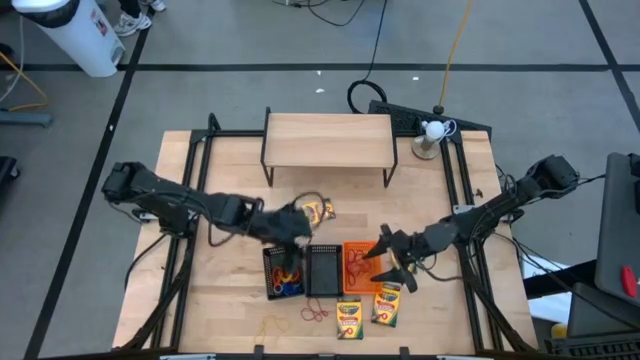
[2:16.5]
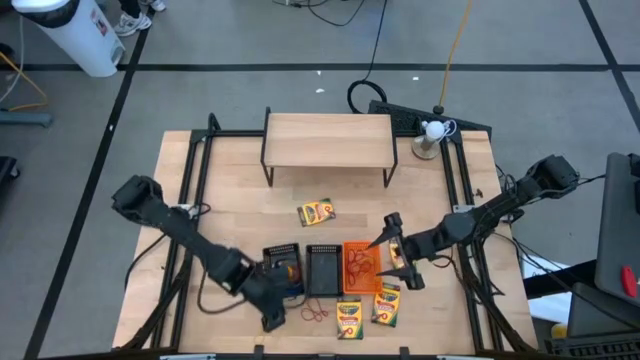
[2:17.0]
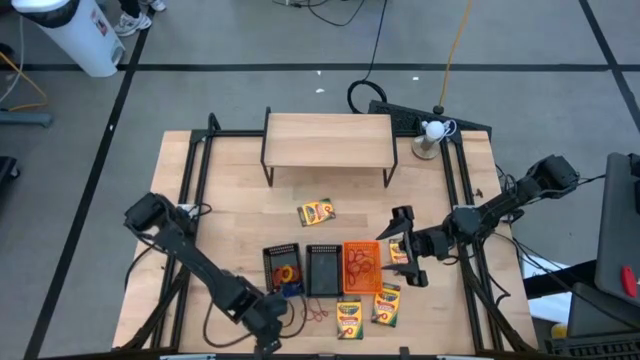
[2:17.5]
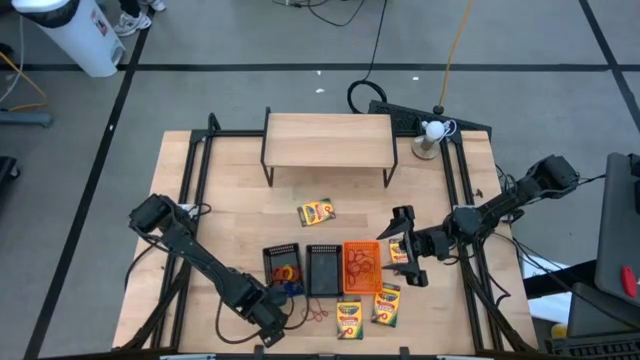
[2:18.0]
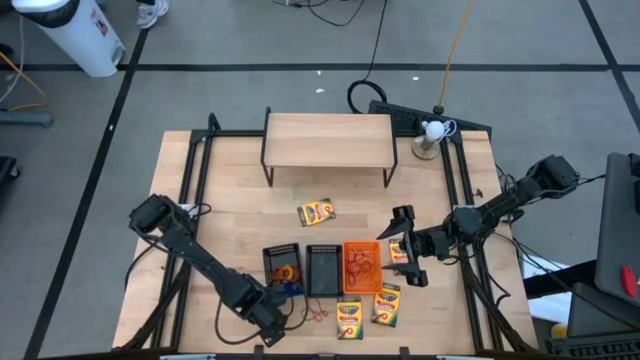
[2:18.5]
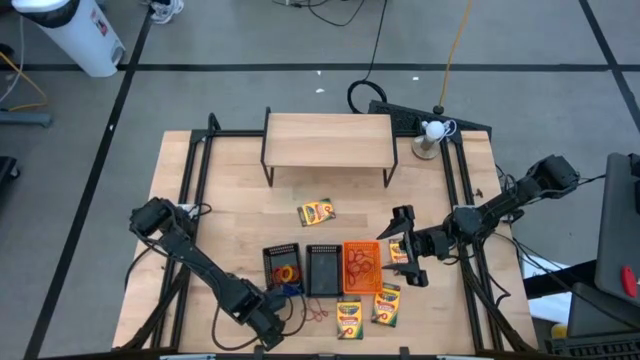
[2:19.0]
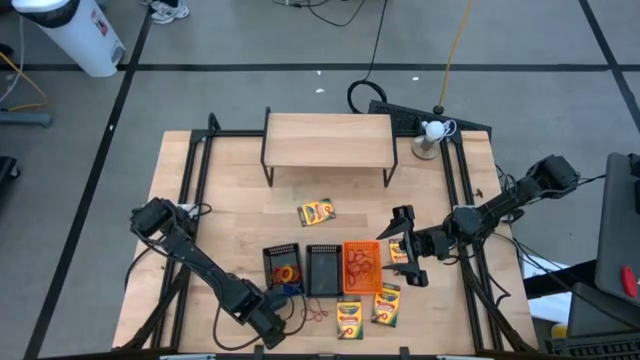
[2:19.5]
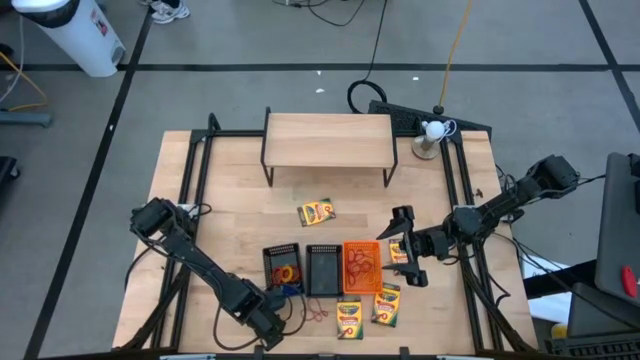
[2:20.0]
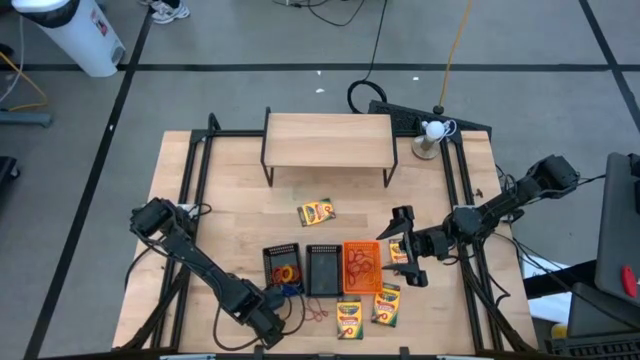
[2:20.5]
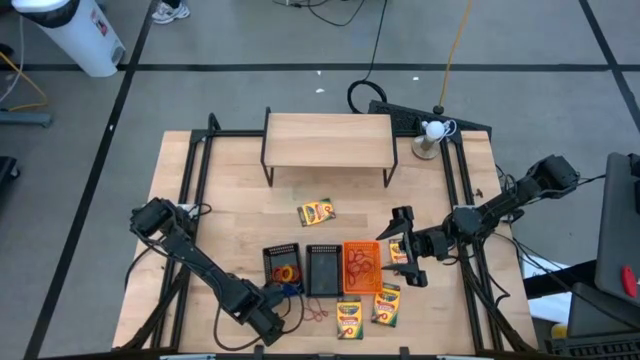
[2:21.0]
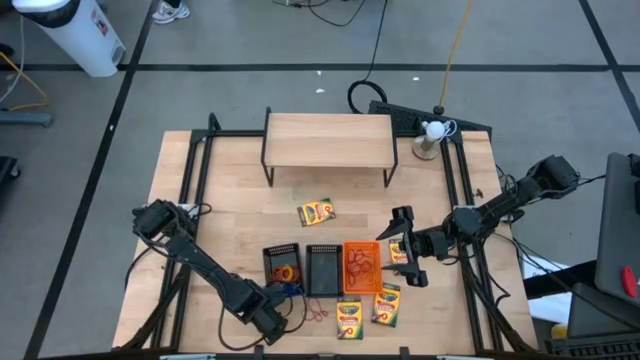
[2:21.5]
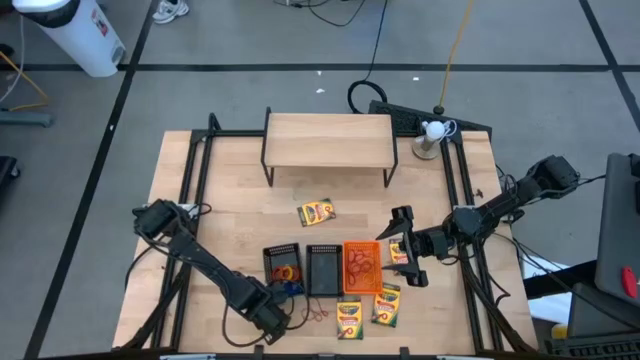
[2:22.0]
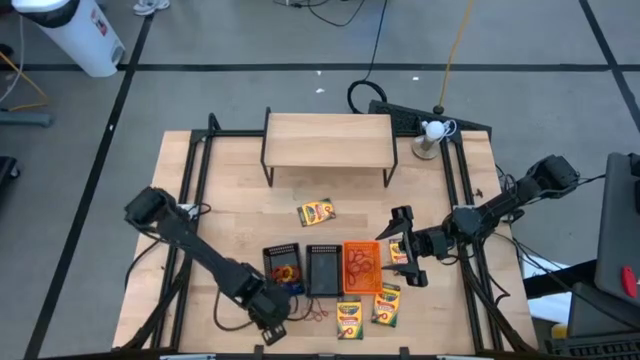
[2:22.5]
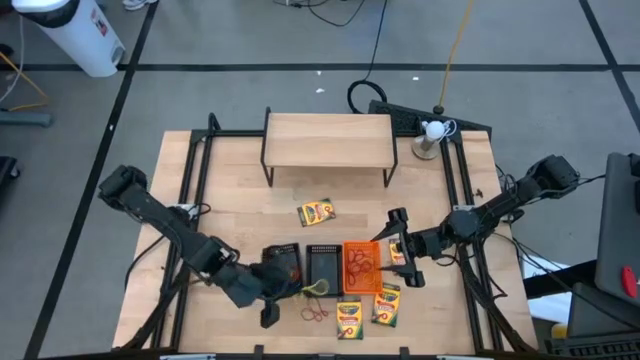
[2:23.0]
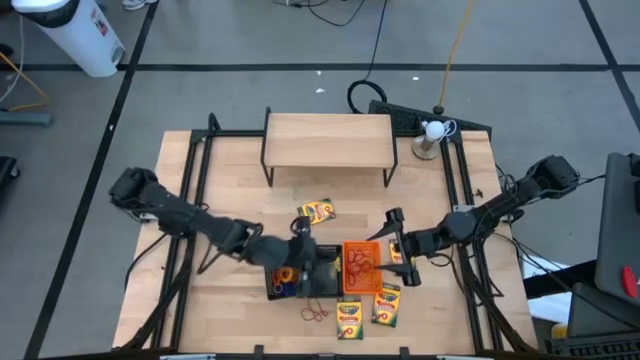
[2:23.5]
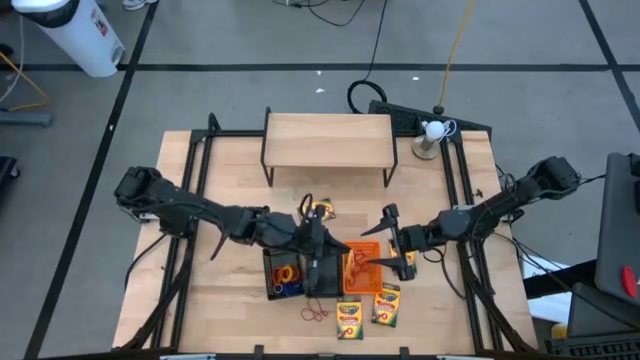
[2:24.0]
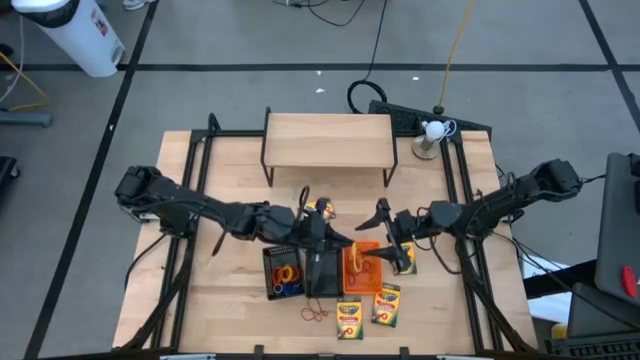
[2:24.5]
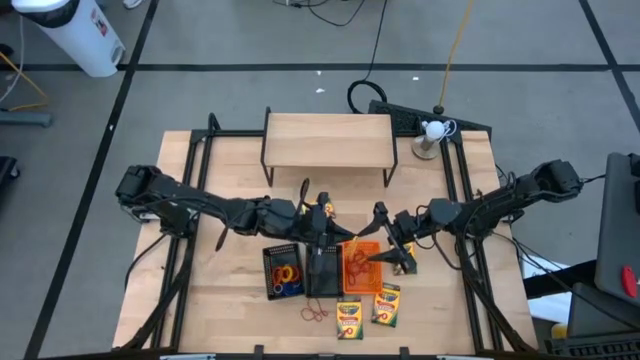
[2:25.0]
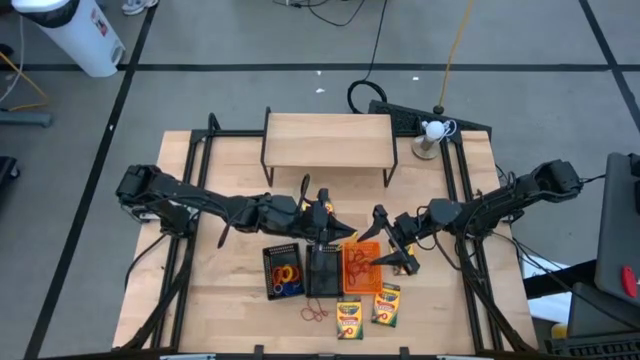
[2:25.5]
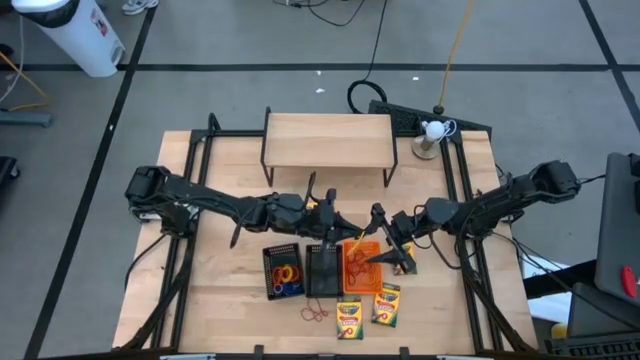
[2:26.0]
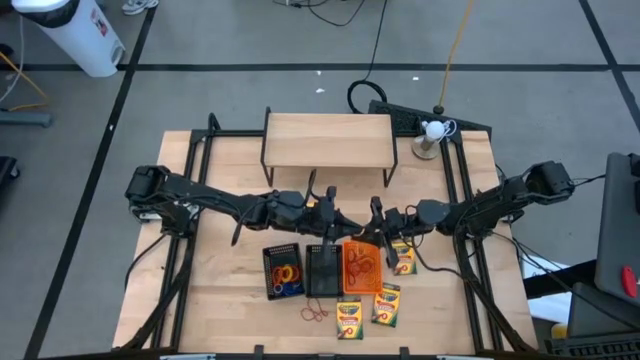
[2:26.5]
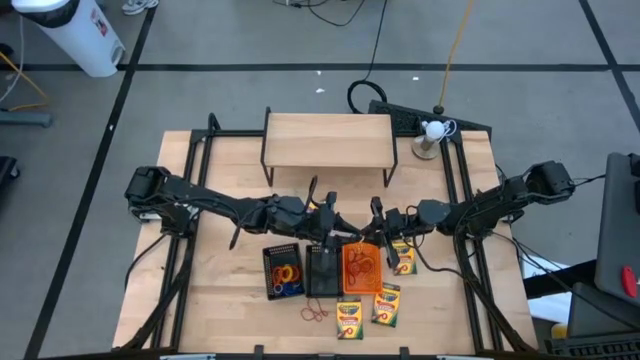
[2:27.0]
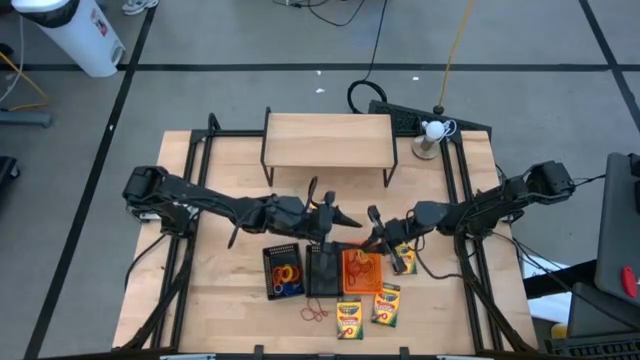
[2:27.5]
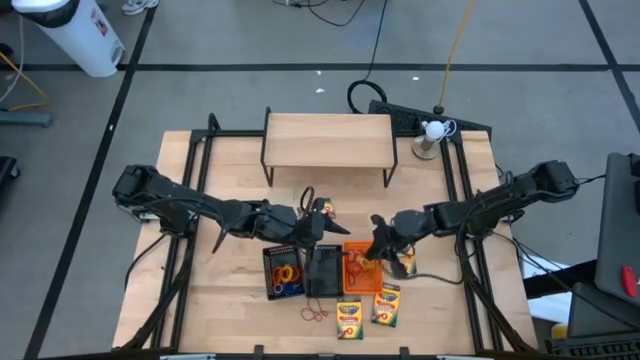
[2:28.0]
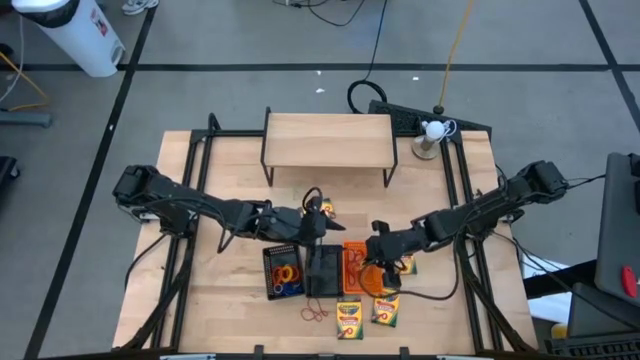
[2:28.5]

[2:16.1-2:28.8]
Task: Pick & Place Office Desk Supplies
Put the yellow rubber band into the orange bin

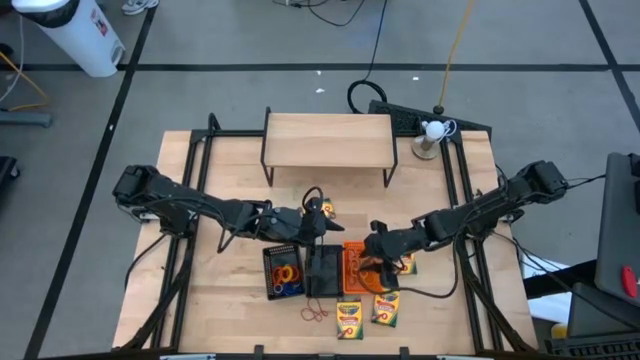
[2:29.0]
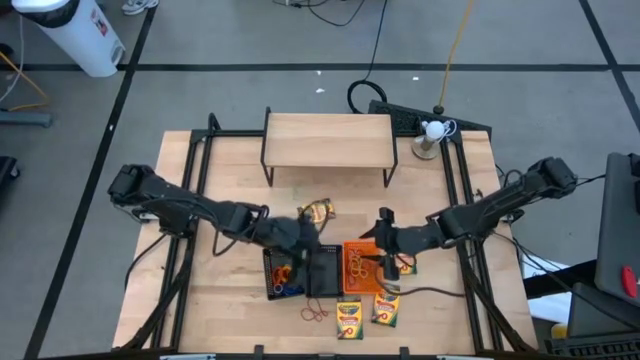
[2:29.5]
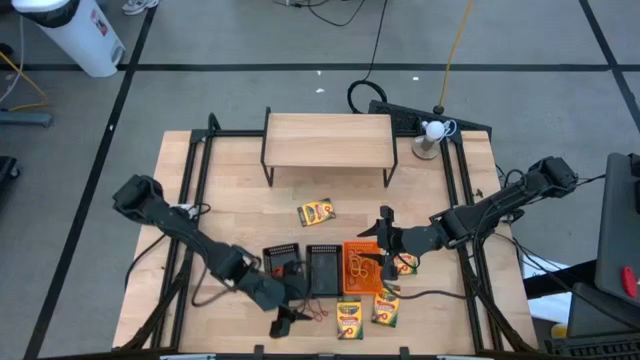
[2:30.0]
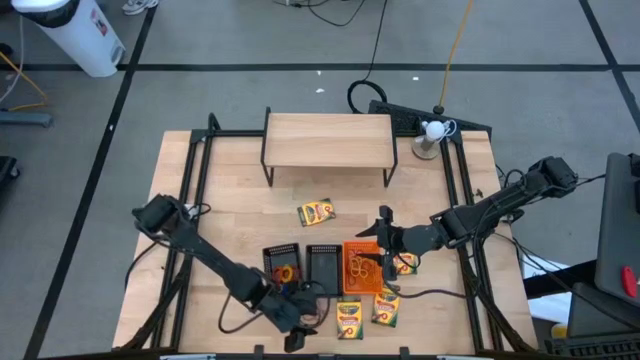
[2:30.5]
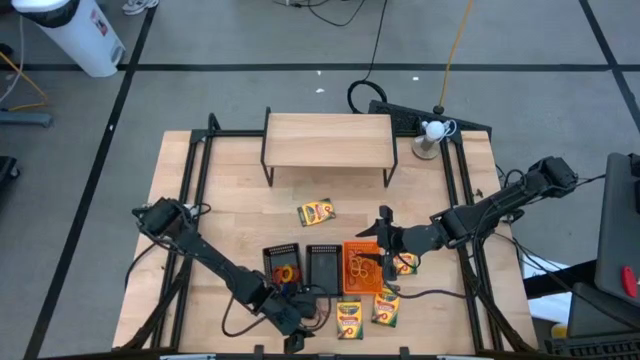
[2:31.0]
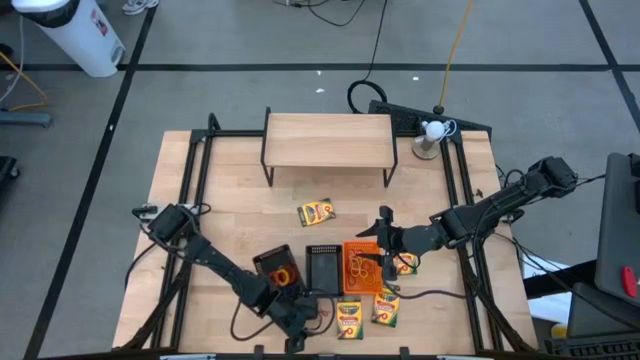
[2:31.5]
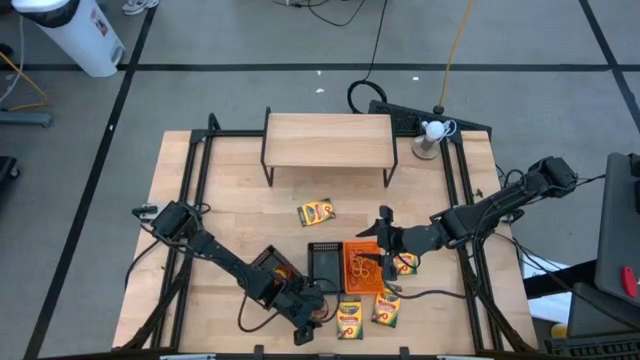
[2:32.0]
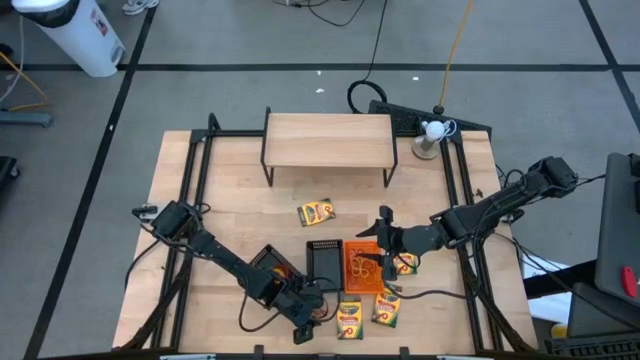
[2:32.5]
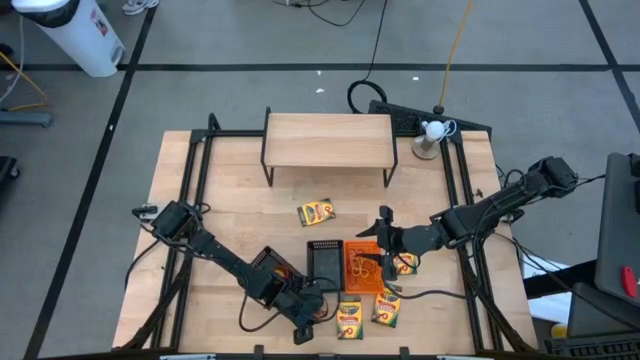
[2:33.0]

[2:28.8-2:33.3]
Put the red rubber band into the orange bin

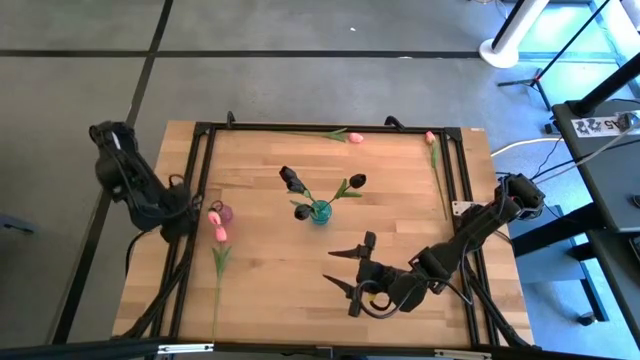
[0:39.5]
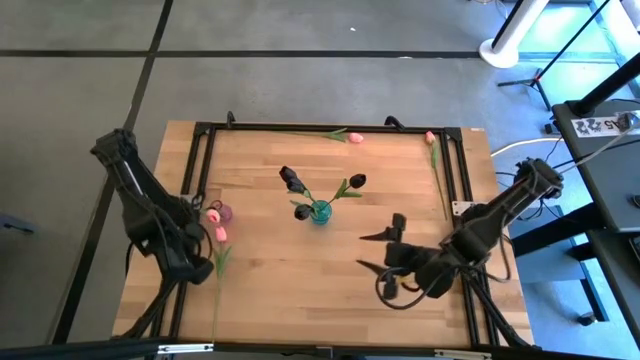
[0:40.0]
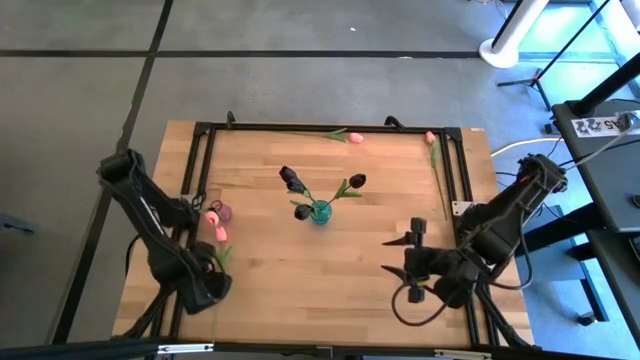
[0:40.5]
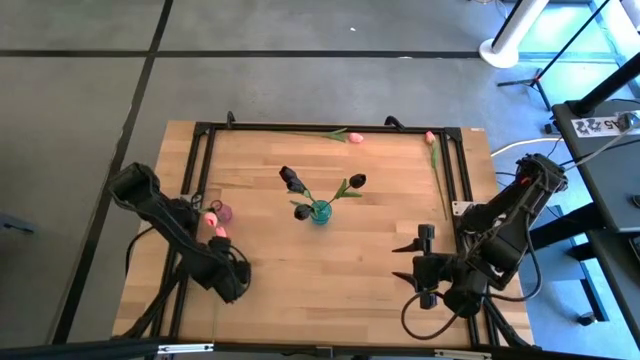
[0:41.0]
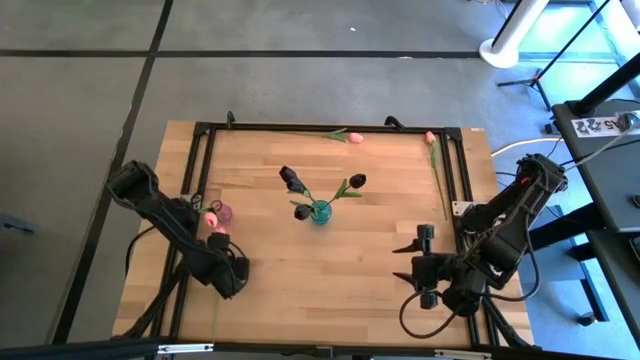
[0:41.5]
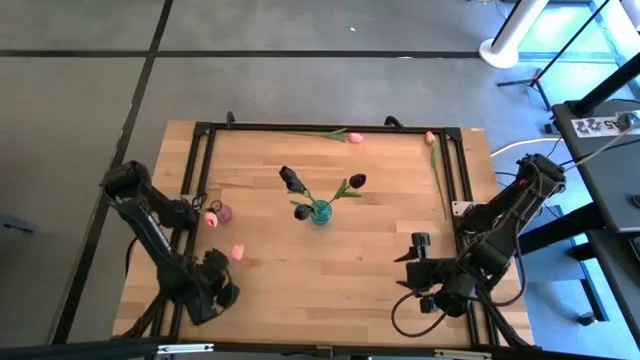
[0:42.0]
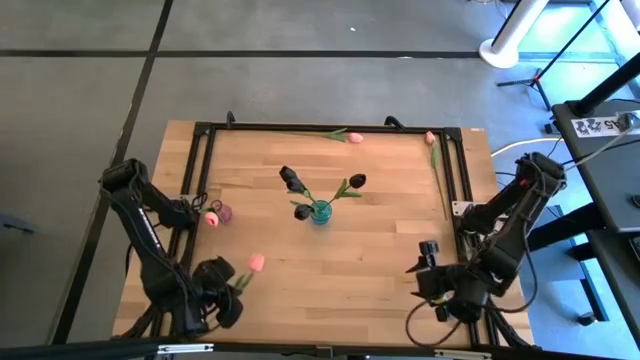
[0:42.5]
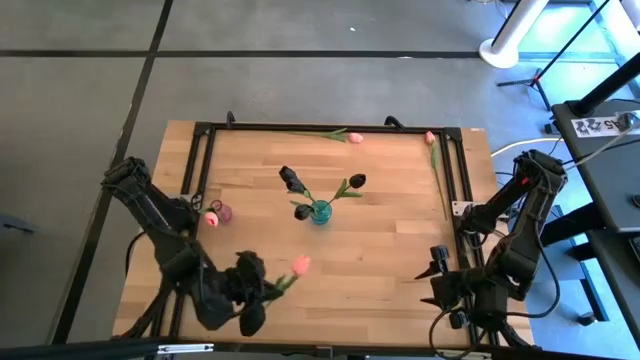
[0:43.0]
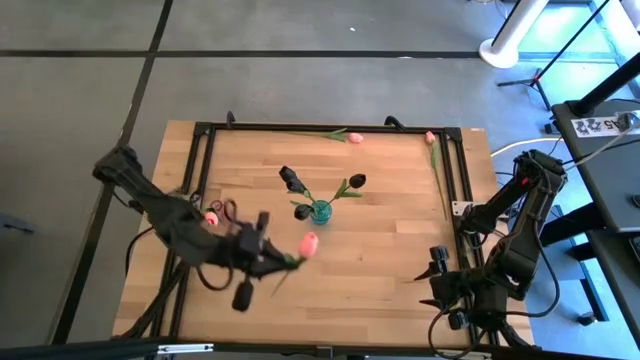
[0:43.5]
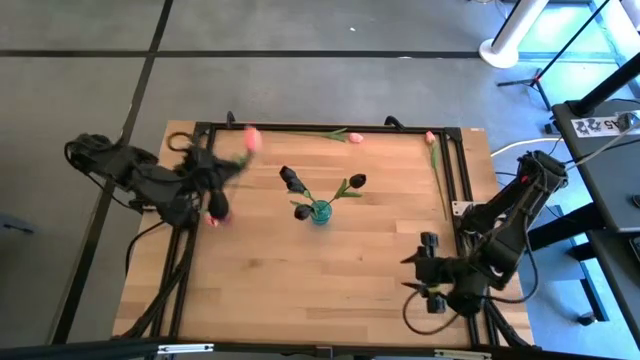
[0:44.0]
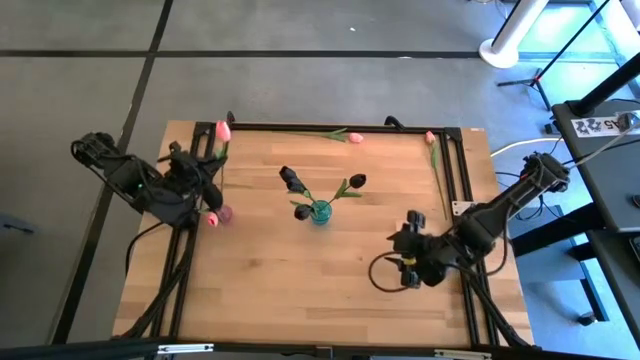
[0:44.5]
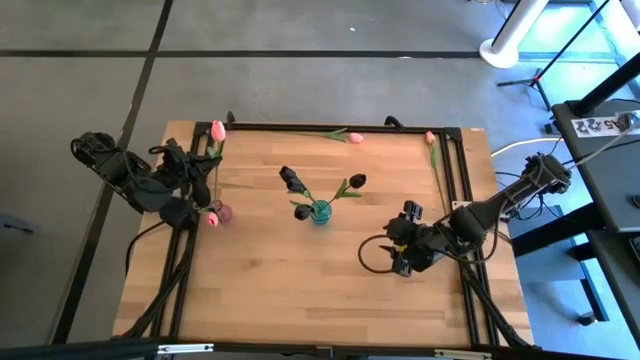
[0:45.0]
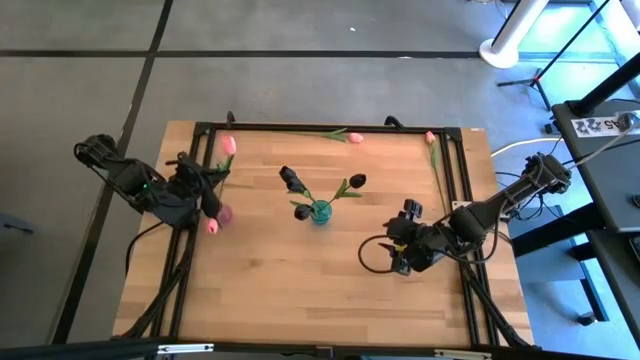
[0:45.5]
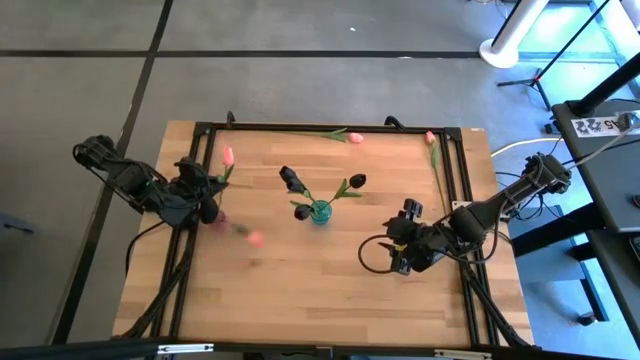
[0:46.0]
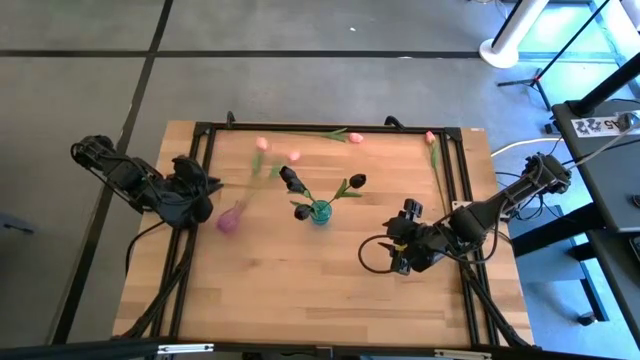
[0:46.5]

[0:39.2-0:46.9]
Task: Sort flowers into vase by color
Put the bottom pink tulip into the pink vase
